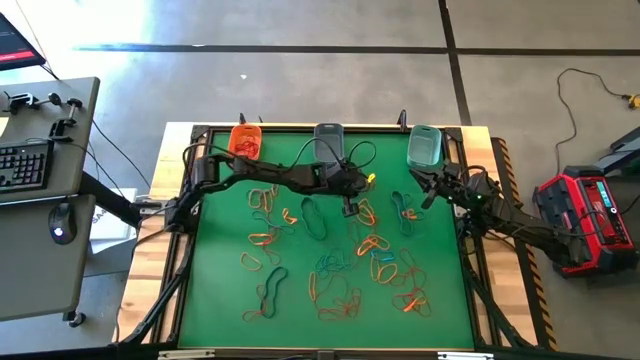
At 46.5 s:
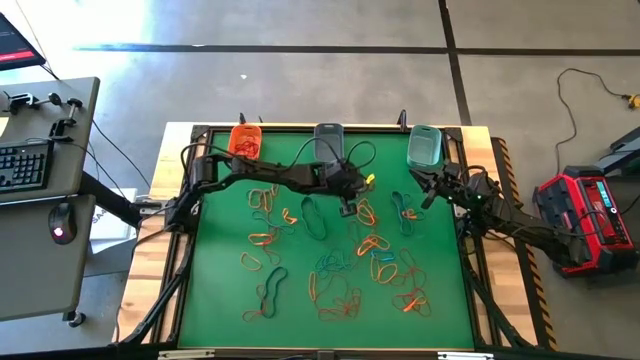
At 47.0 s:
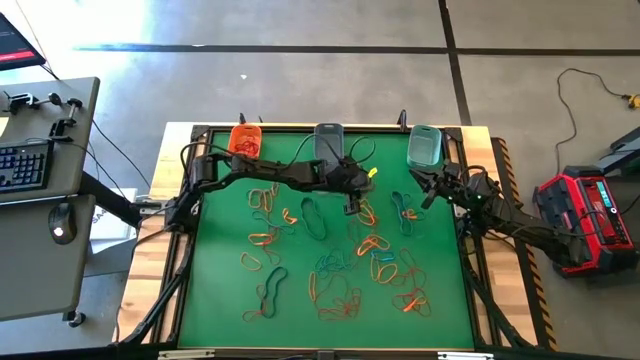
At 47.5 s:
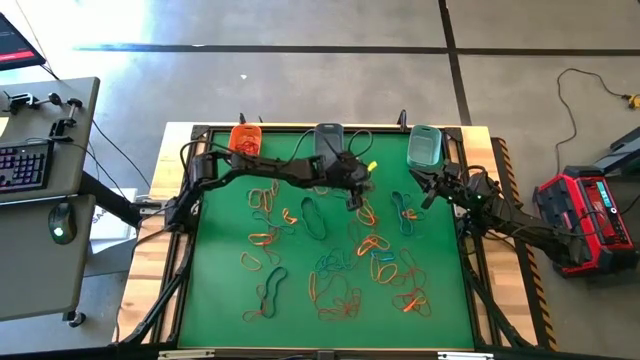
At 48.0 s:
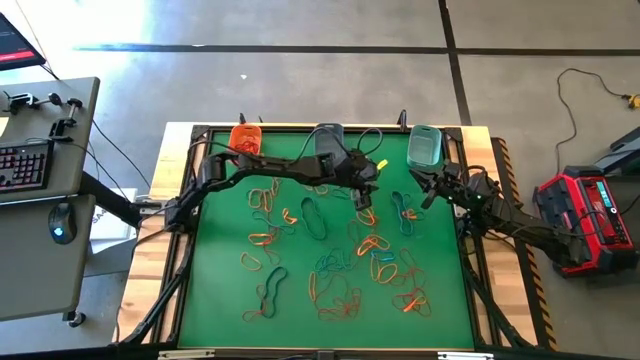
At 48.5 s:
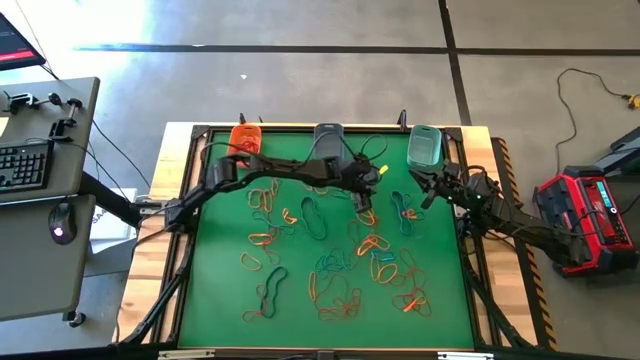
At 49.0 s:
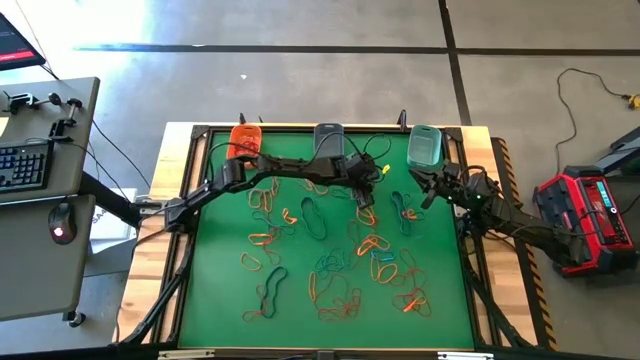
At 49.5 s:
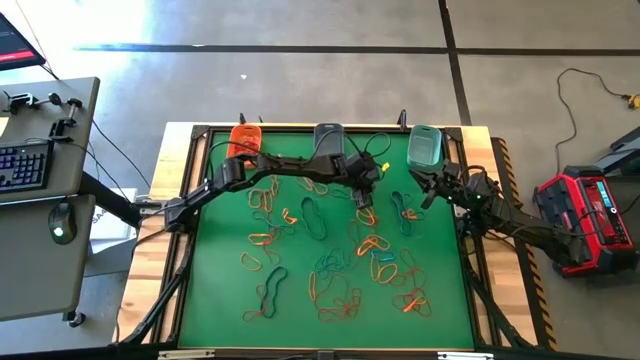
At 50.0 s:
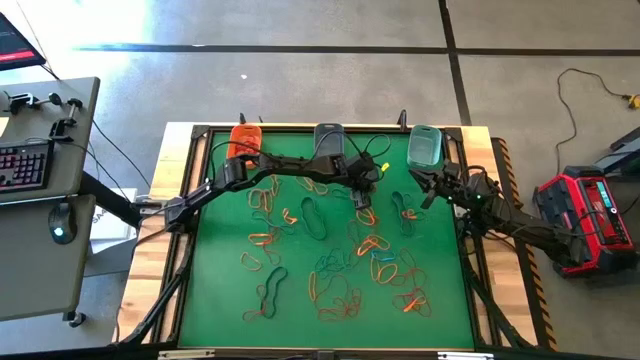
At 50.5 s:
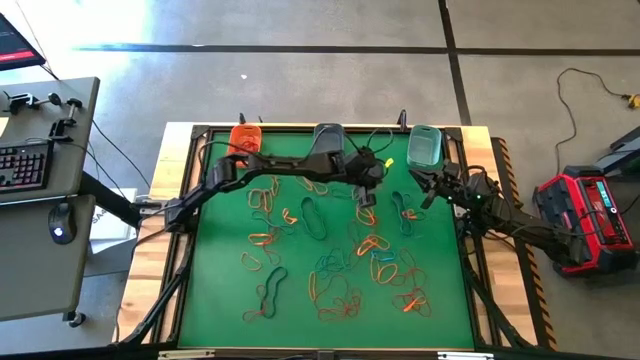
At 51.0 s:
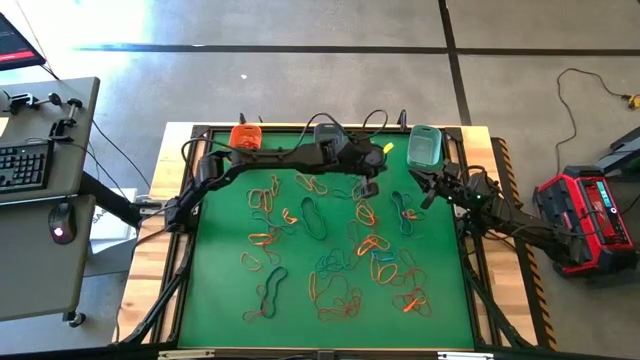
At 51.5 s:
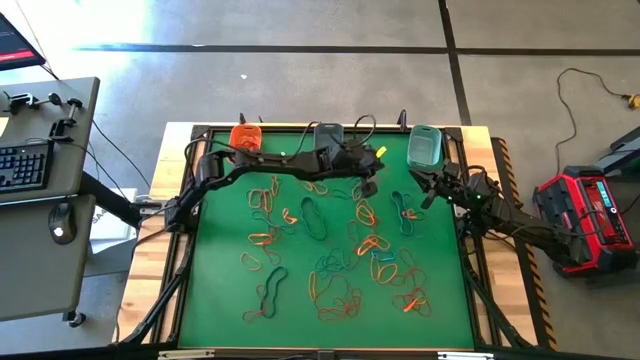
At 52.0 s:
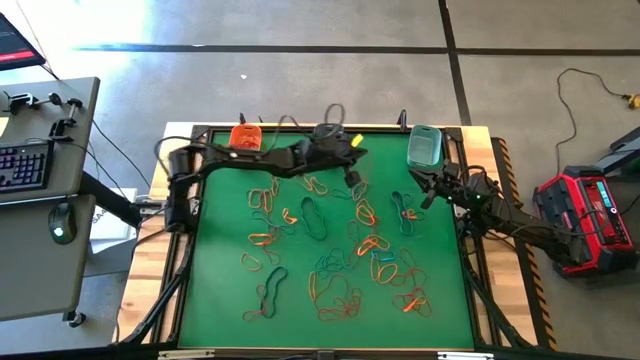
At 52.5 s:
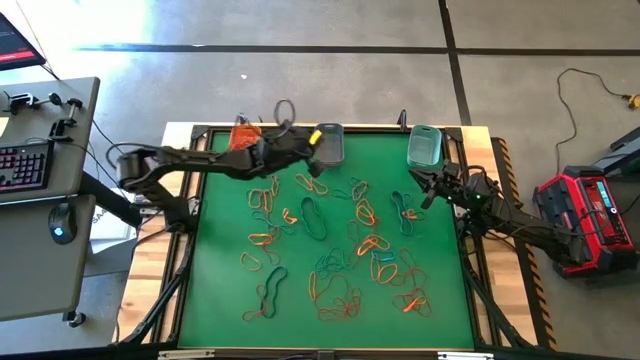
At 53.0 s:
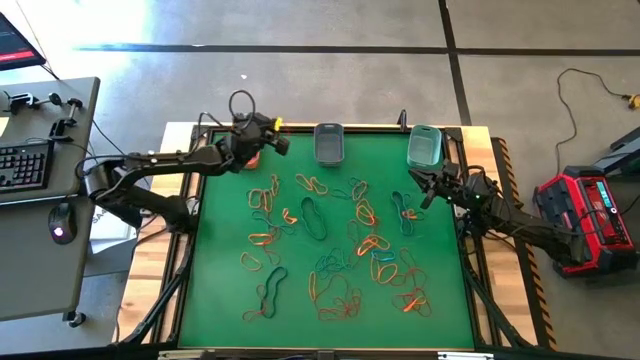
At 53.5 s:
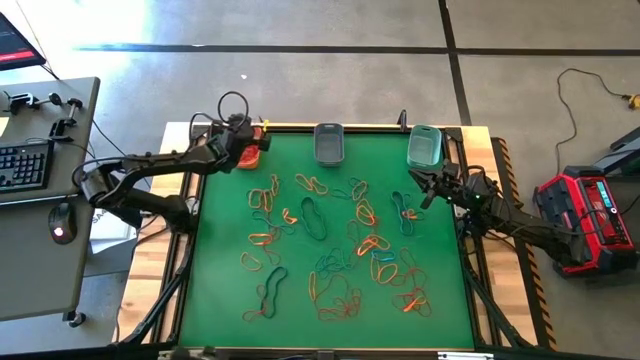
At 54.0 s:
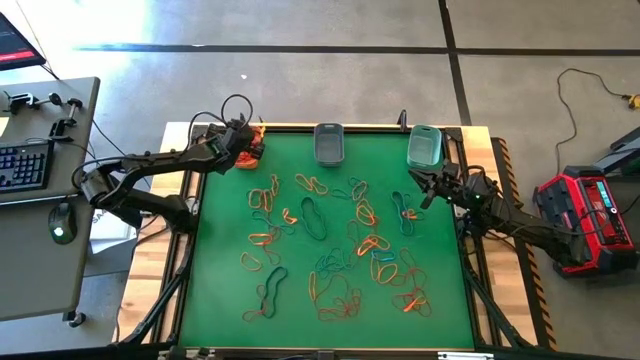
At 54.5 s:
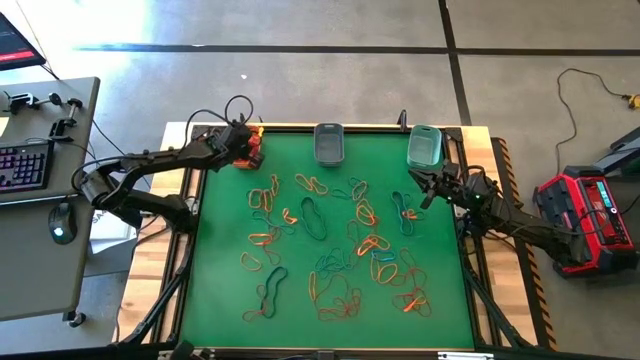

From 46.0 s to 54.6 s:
Task: Sort rubber bands into baskets
Put the red rubber band into the orange bin

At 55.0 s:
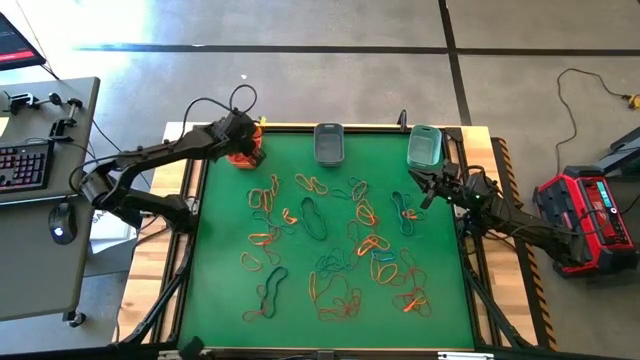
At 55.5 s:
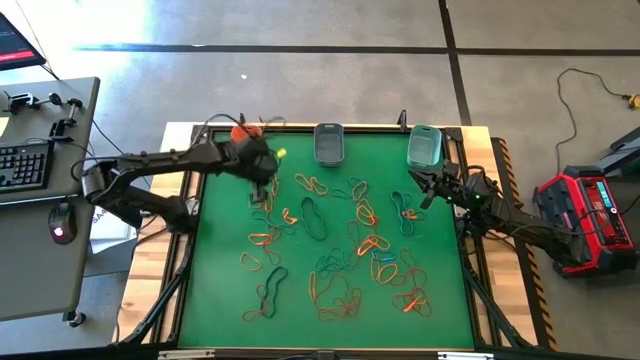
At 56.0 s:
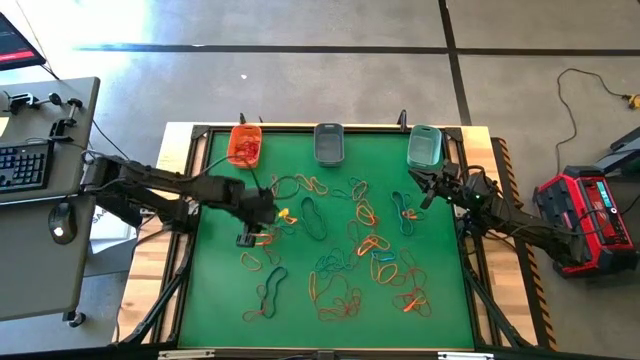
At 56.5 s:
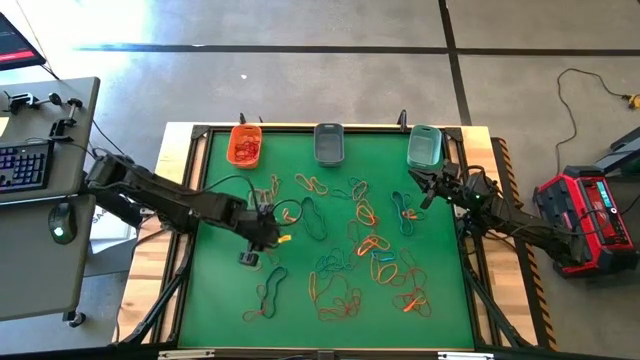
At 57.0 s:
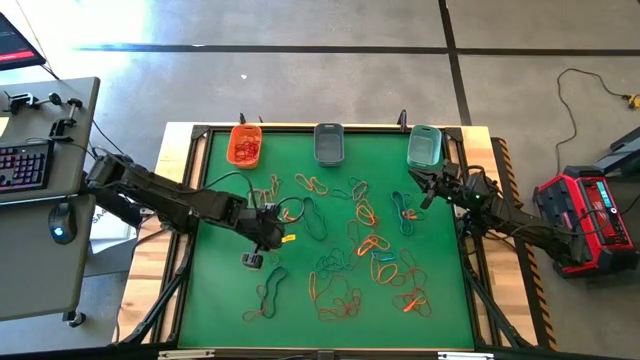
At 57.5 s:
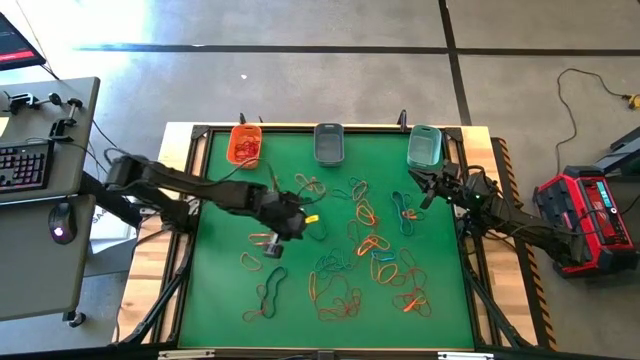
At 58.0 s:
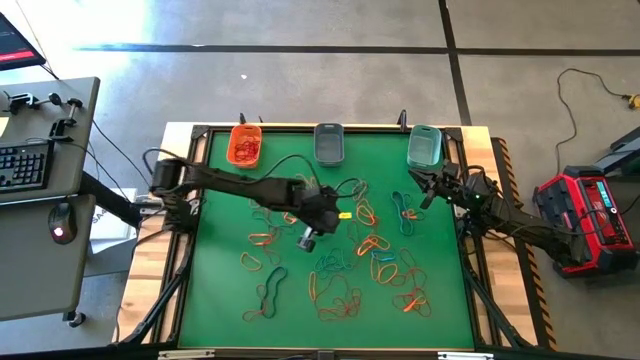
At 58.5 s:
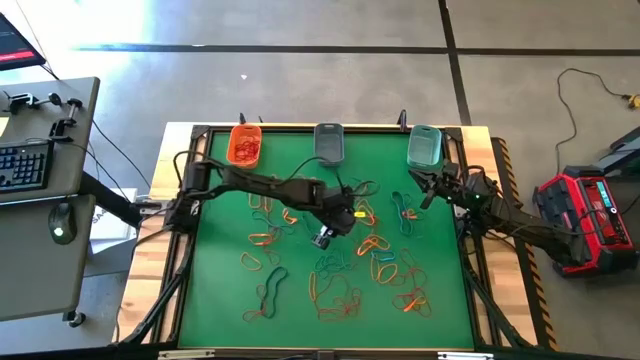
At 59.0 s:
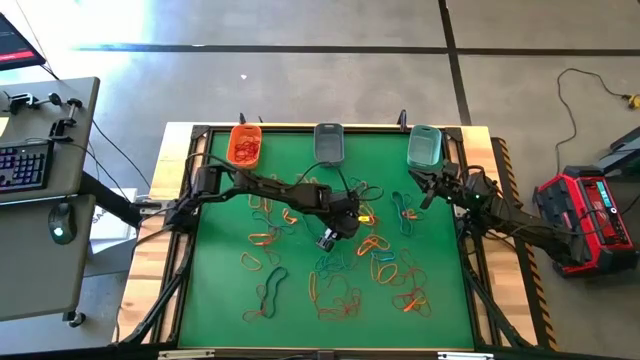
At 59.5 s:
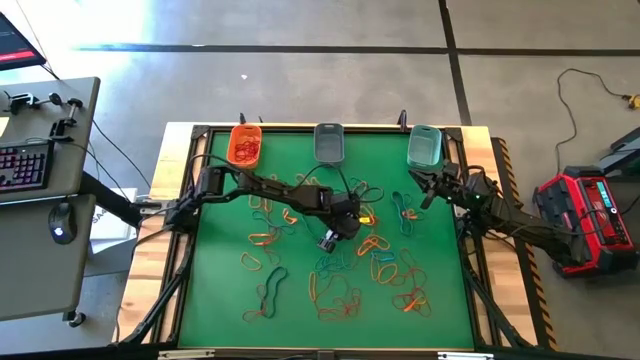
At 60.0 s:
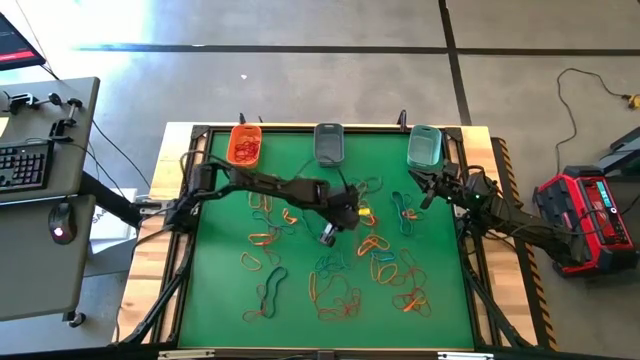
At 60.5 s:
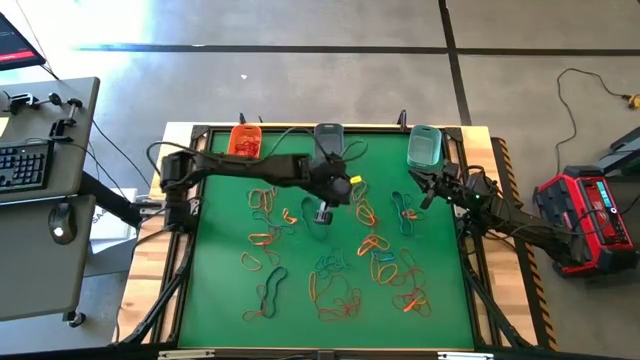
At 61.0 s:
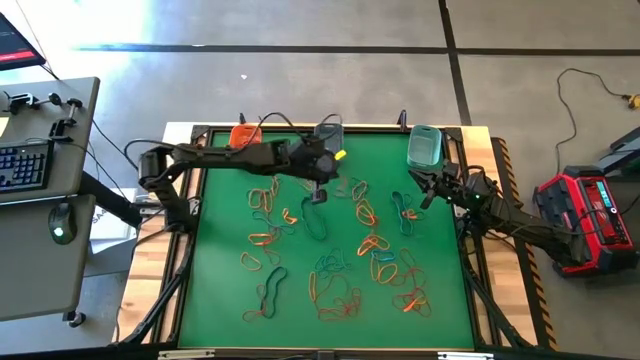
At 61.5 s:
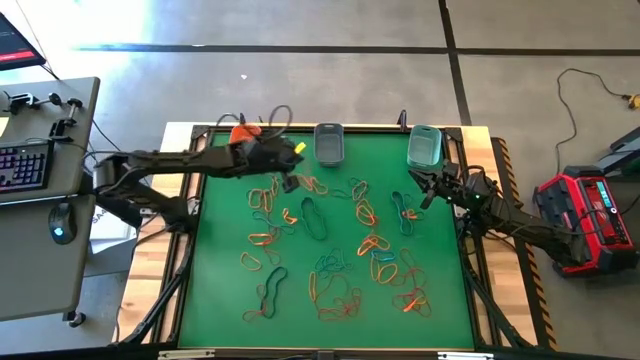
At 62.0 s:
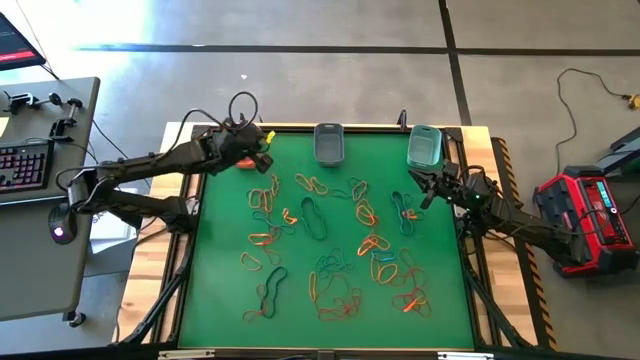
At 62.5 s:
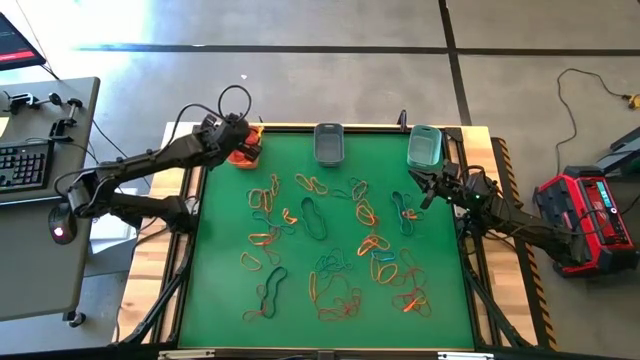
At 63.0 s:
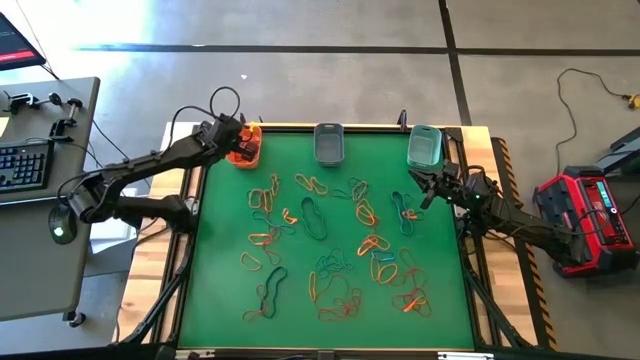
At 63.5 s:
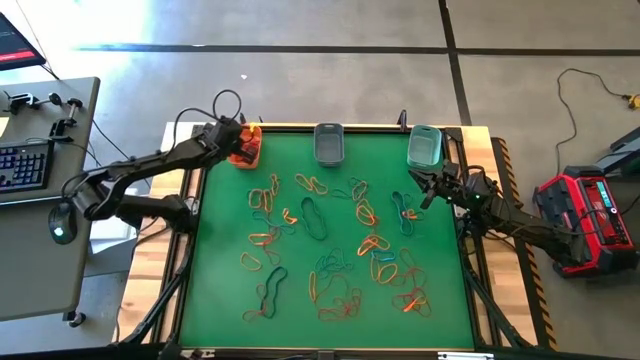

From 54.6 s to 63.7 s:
Put the red rubber band into the orange bin
